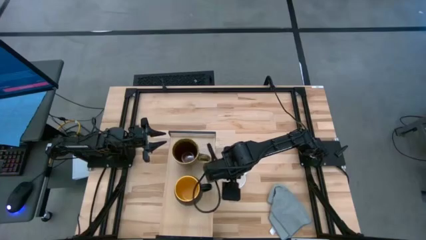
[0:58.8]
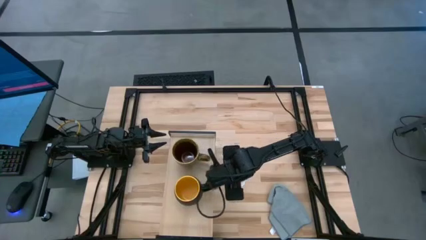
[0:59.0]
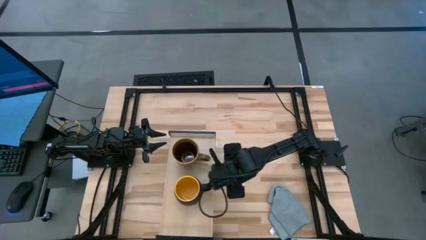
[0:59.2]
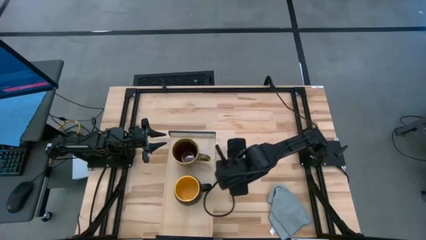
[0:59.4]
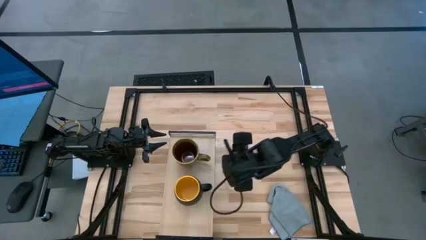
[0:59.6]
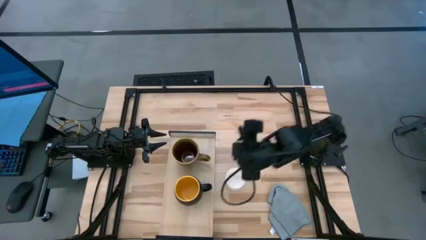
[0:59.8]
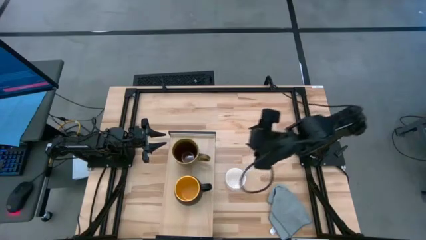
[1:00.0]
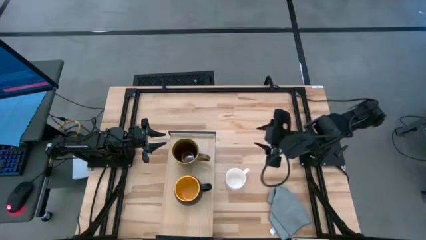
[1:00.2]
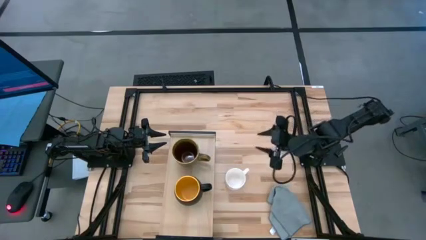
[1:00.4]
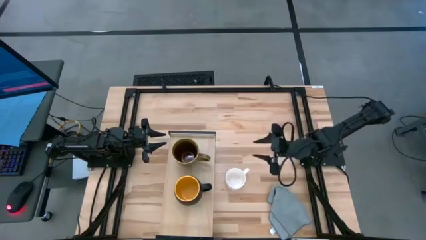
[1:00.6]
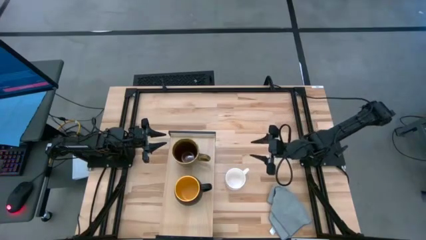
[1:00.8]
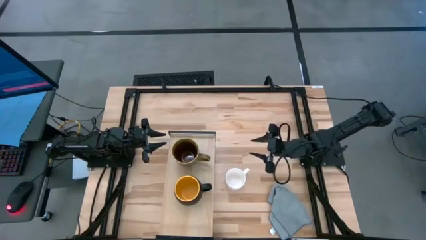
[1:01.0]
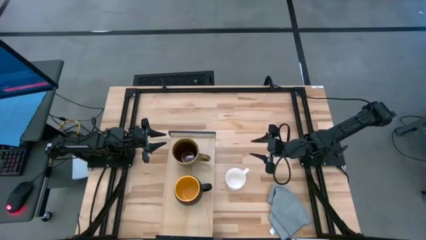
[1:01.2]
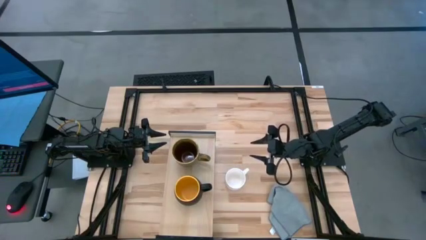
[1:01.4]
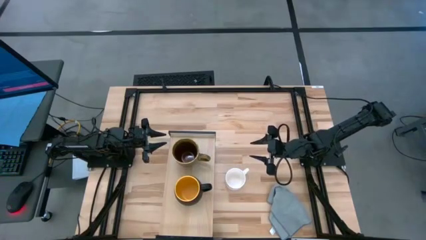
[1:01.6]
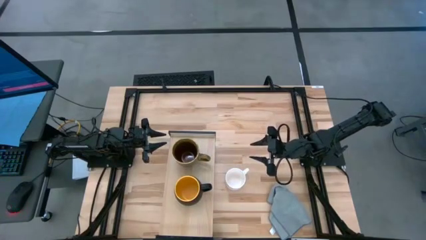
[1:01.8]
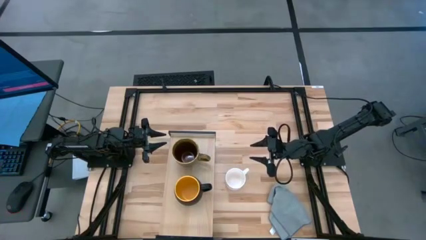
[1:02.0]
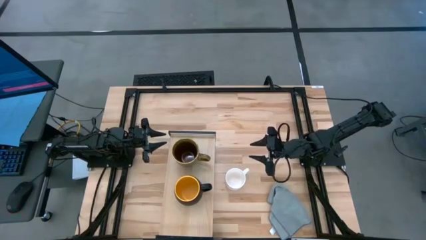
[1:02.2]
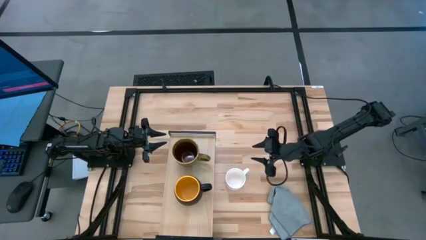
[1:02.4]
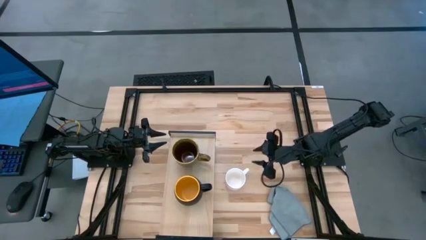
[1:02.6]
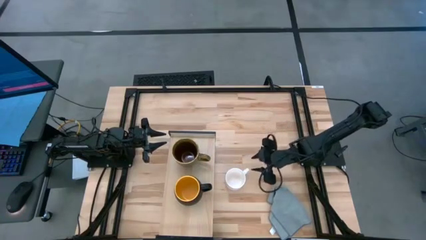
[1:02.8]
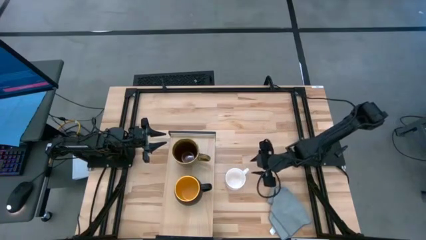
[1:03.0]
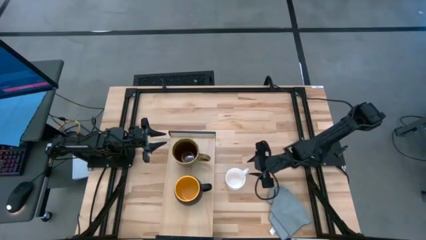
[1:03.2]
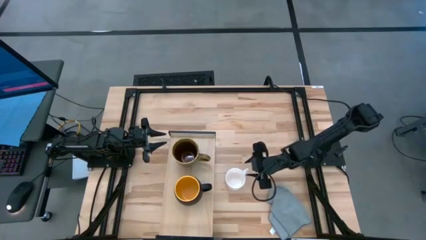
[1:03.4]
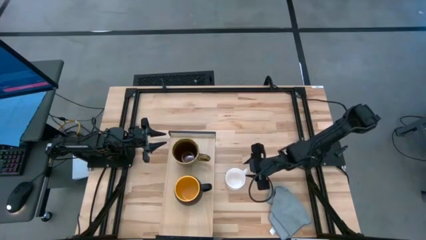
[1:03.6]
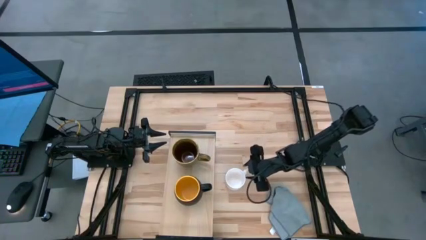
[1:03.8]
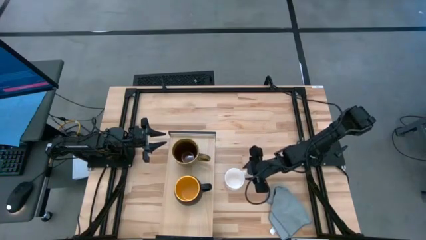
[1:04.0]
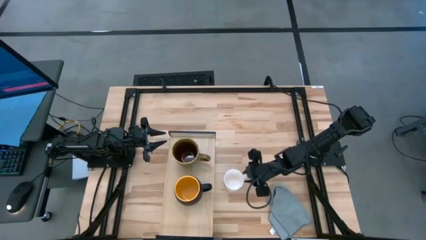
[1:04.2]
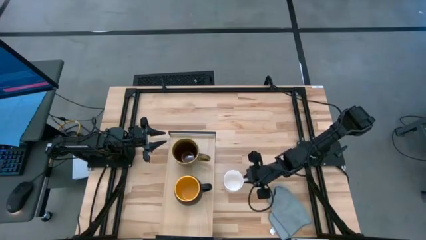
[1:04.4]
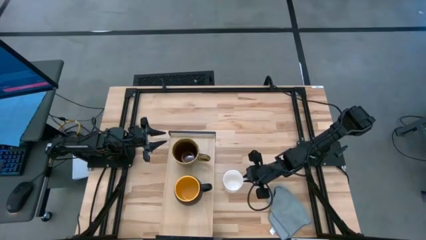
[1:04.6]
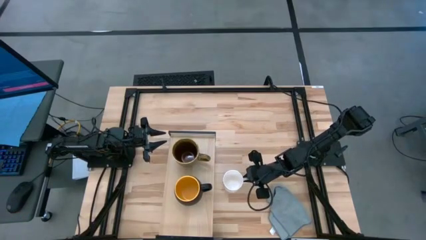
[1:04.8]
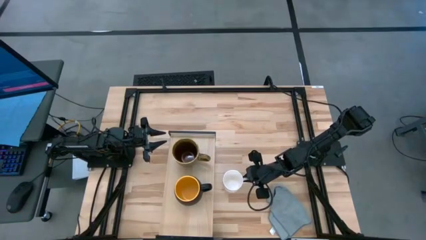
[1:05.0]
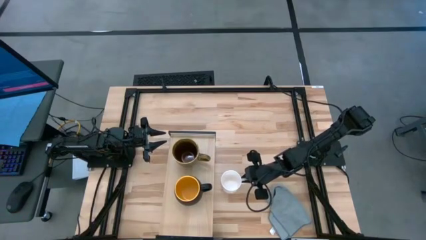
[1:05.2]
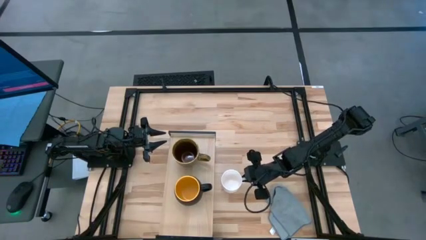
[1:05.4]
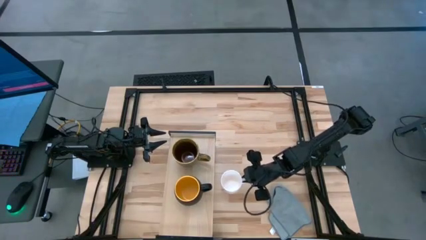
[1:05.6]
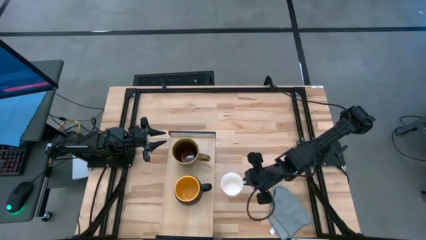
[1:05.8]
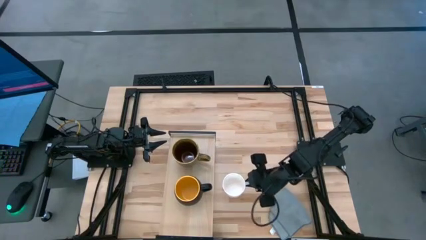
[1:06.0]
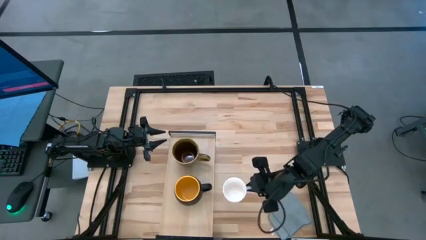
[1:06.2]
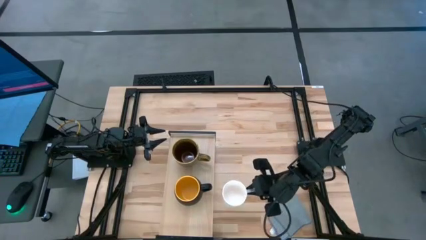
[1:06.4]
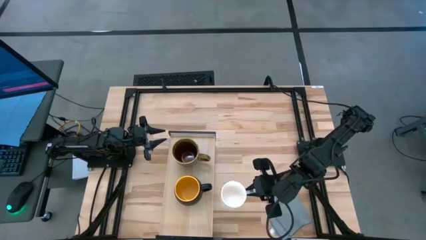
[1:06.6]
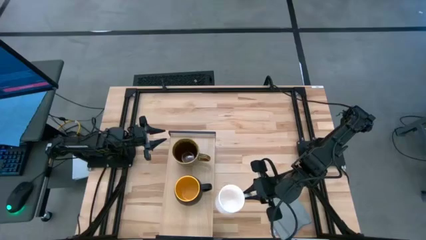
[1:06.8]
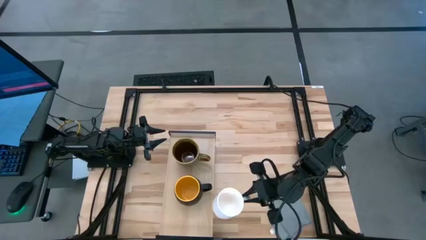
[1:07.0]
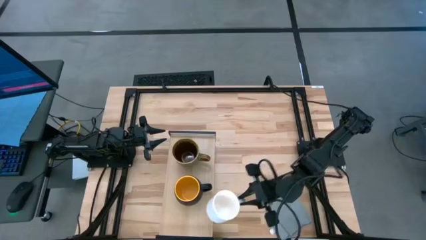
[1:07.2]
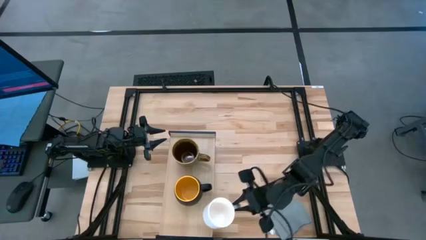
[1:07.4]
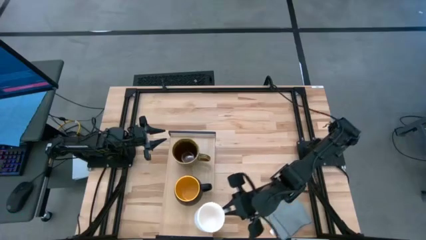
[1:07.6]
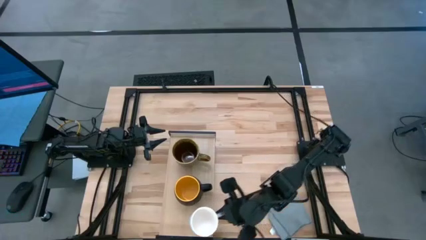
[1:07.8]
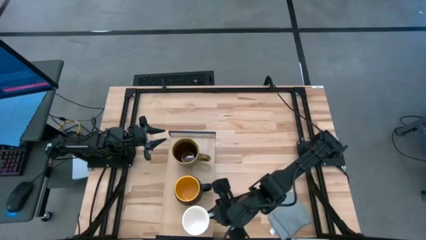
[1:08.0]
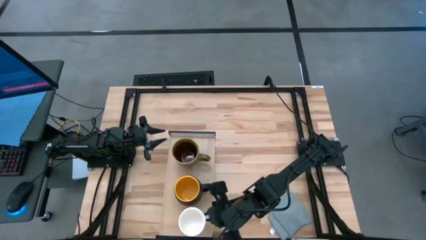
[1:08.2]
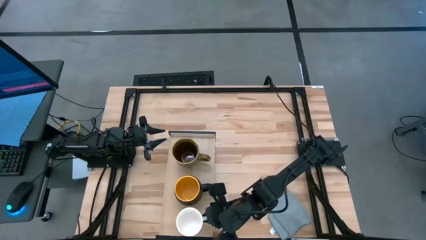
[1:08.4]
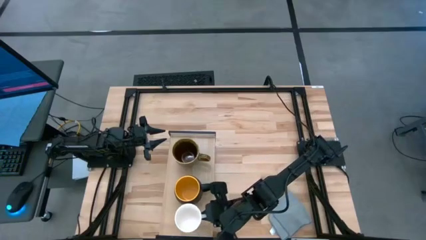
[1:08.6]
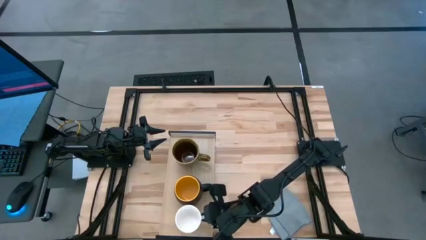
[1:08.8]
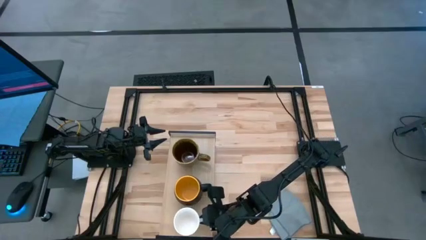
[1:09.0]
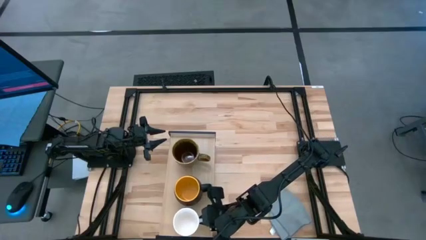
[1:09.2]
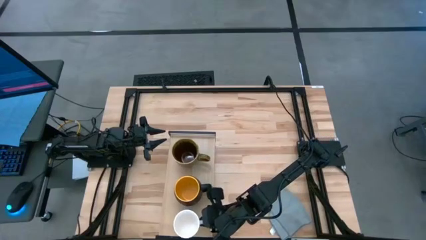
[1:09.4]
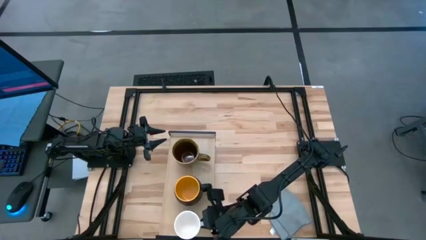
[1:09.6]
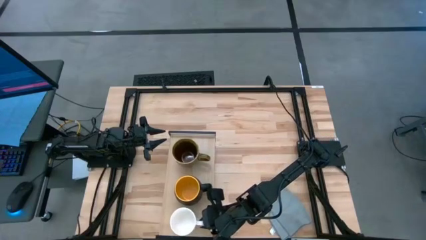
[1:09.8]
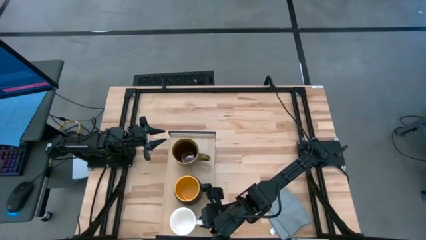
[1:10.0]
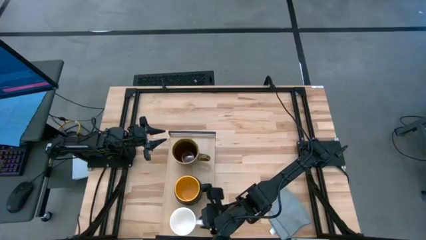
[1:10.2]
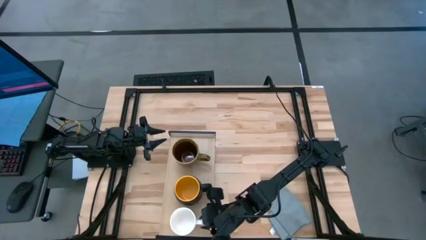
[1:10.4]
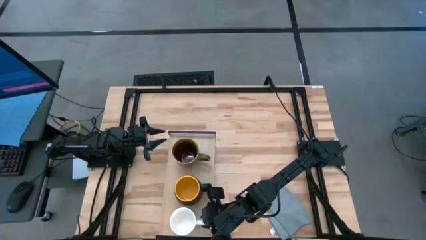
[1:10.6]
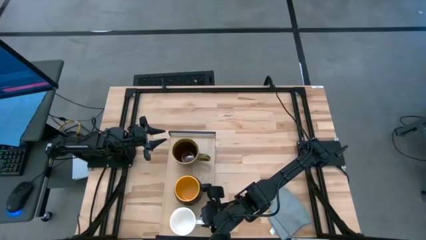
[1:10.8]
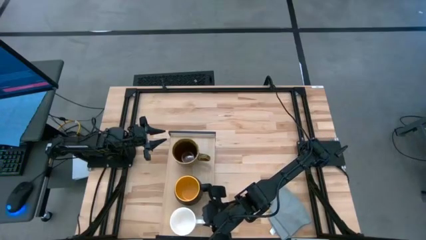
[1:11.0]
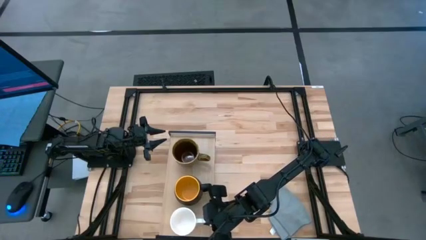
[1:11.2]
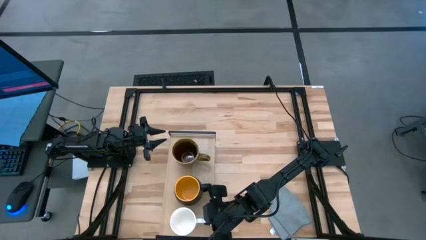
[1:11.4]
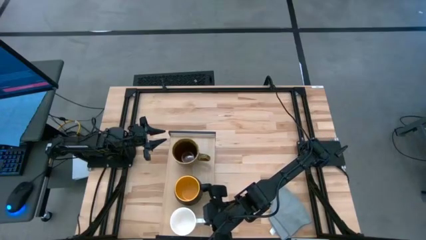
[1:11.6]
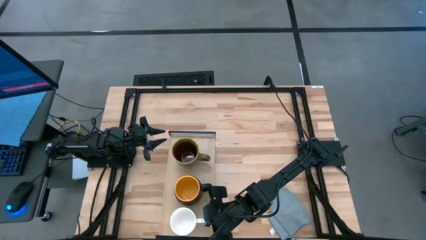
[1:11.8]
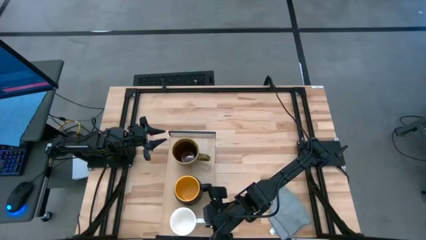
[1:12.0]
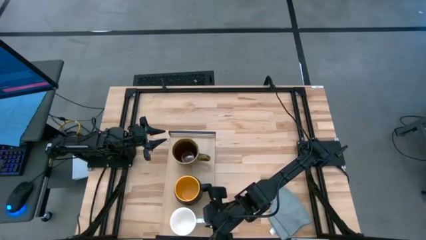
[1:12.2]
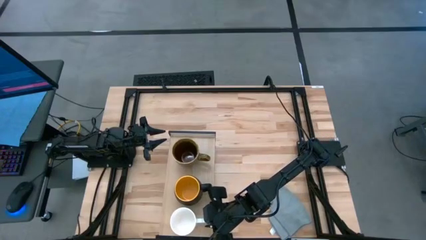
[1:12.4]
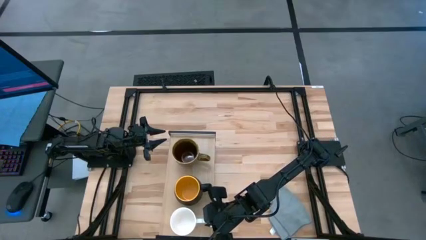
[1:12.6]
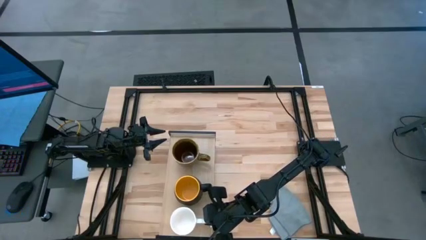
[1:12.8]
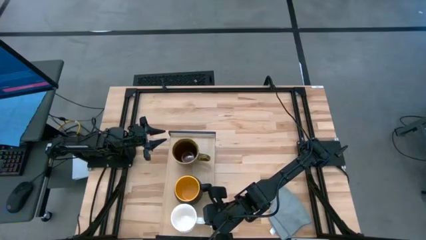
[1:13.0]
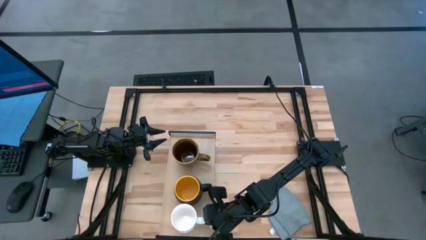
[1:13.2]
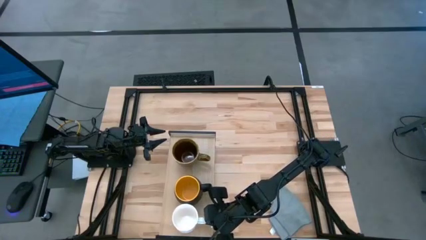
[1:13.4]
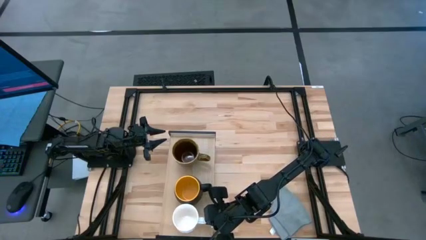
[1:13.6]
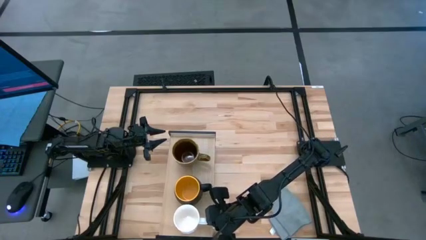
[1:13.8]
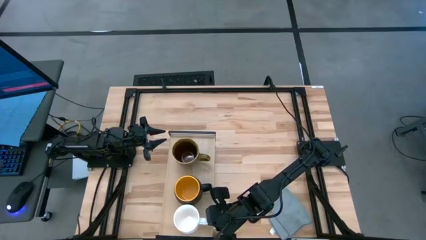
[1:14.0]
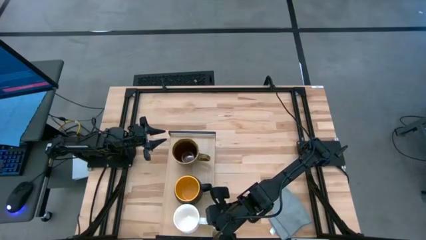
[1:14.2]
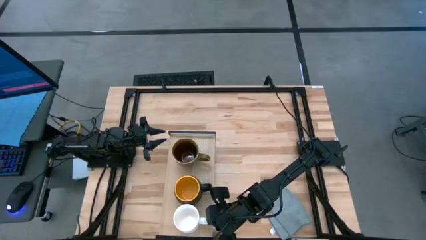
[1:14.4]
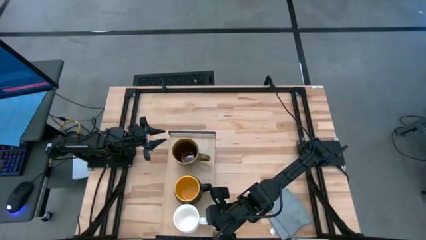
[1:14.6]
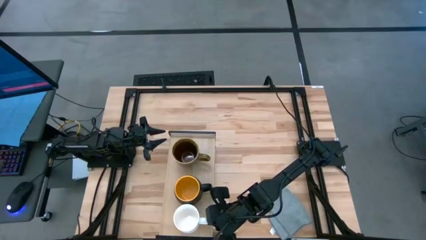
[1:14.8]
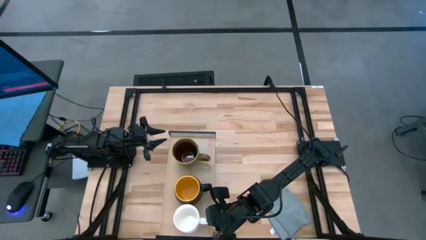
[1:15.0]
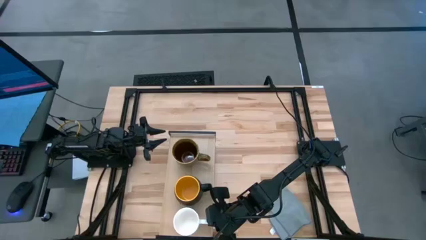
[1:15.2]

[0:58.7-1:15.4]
Task: Stack small to large cups/mugs on shelf
Put the white mug on the shelf
